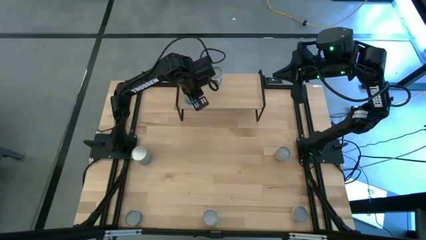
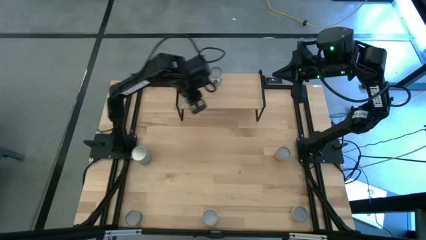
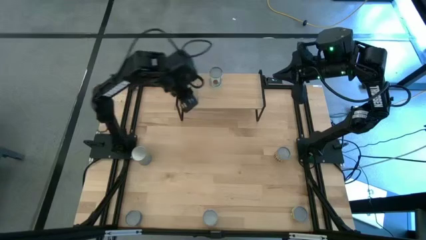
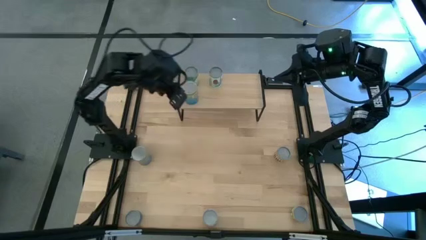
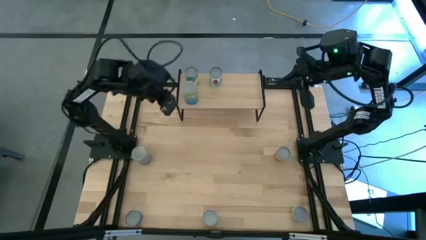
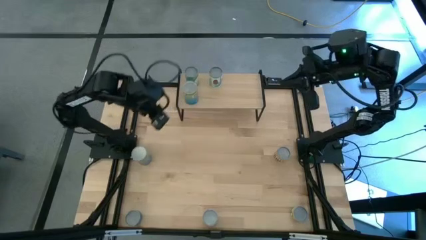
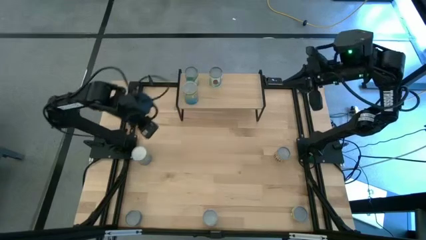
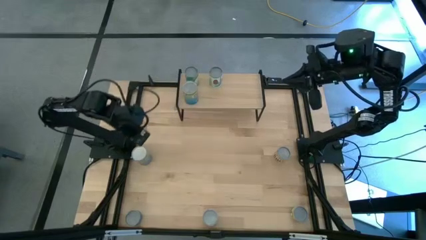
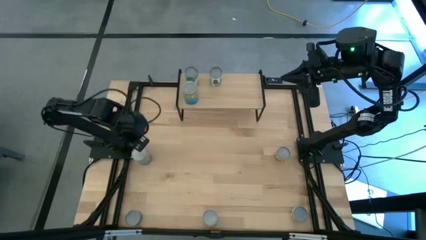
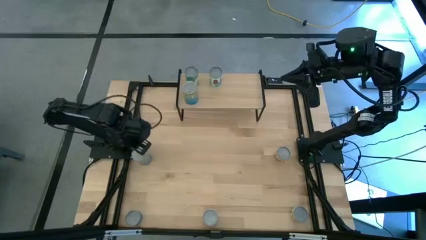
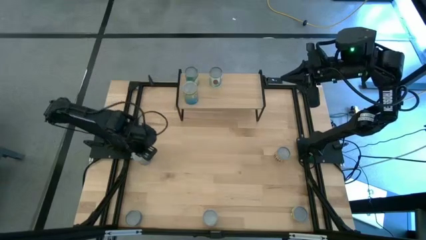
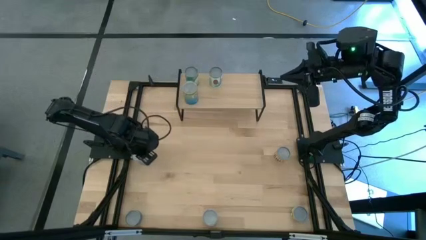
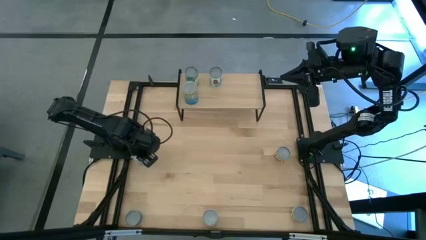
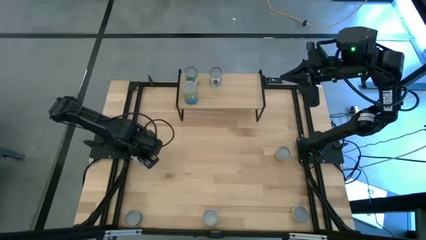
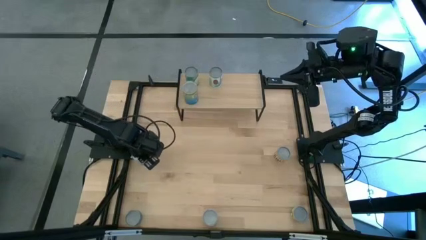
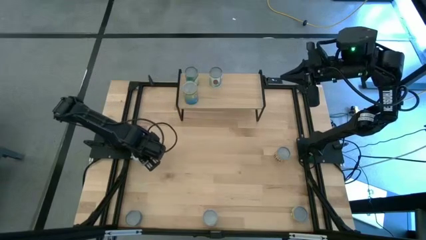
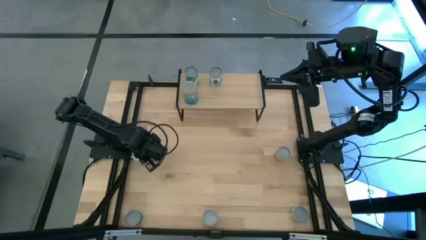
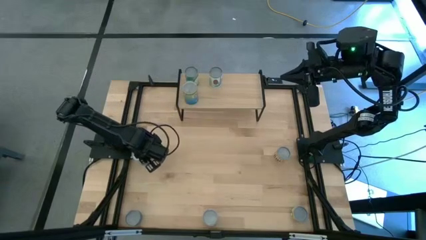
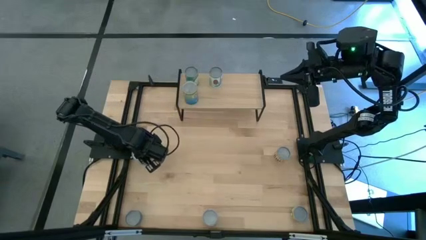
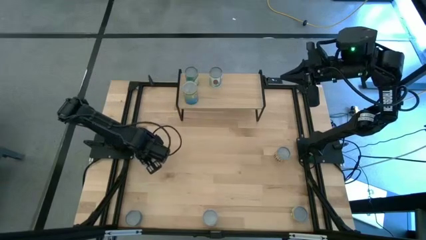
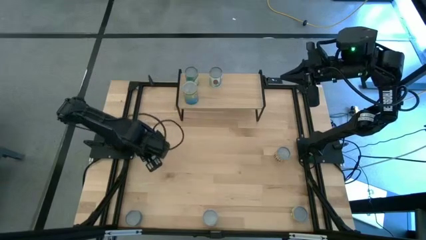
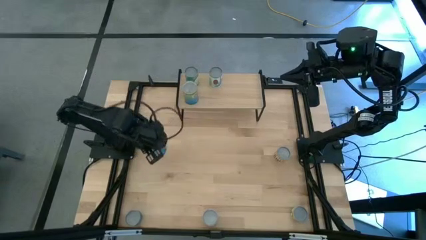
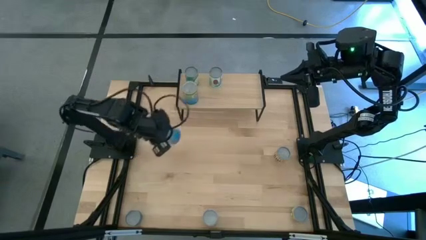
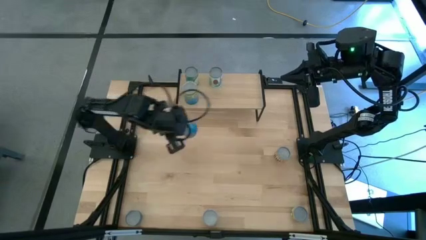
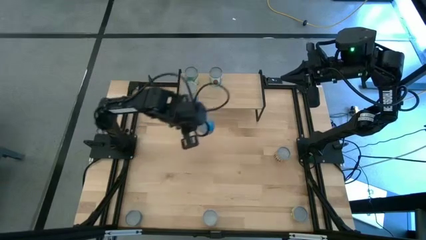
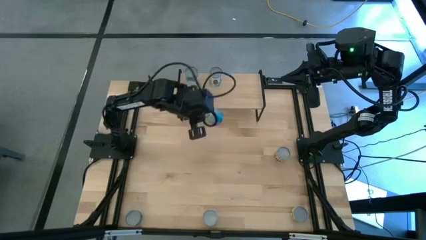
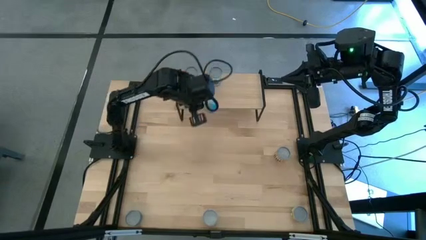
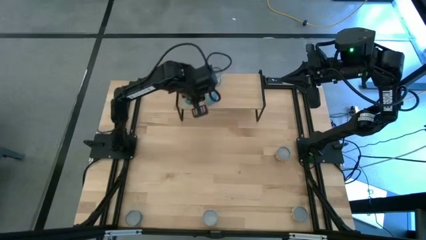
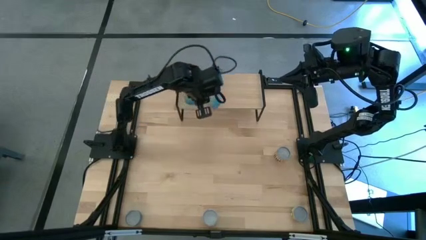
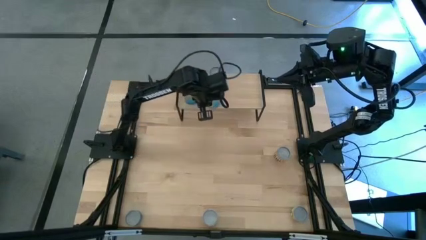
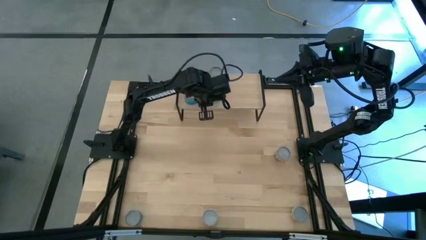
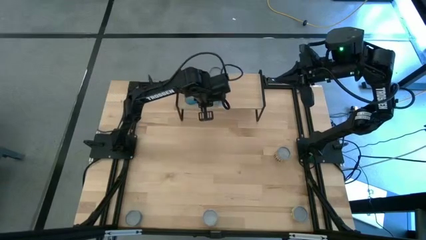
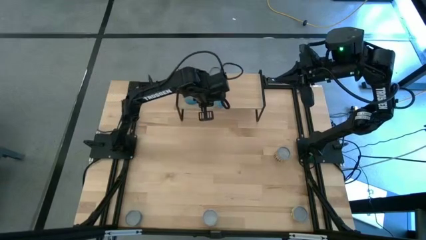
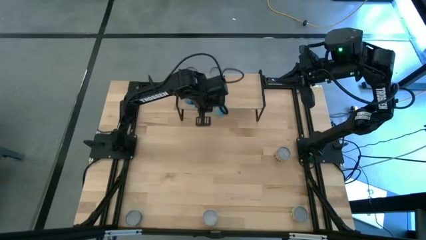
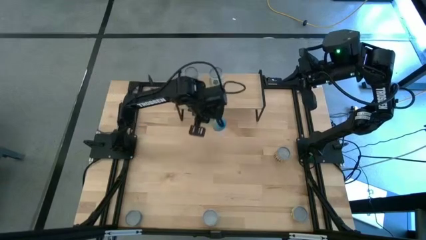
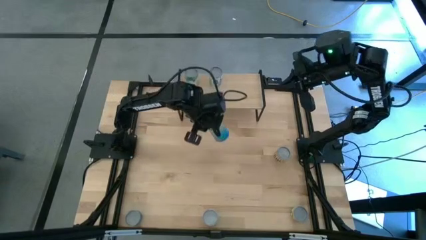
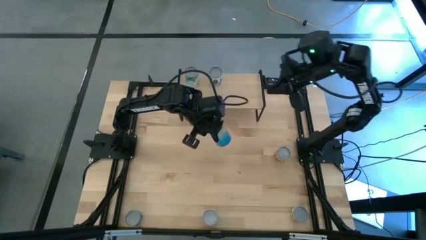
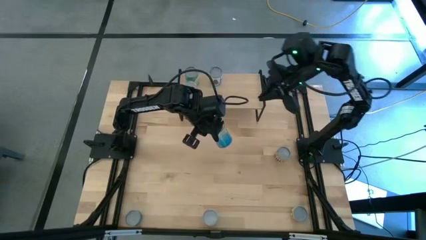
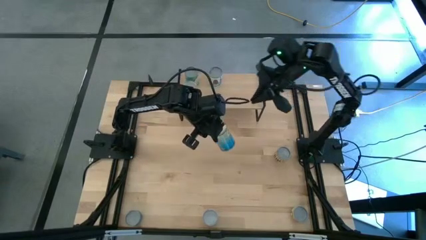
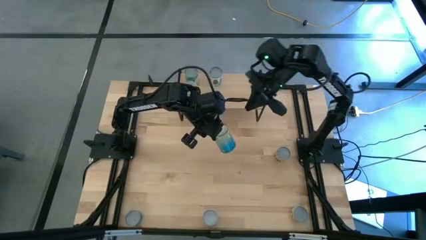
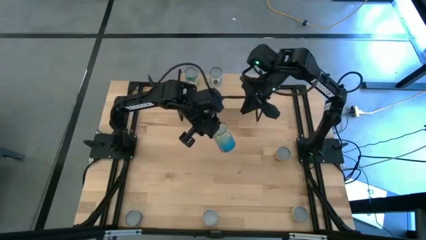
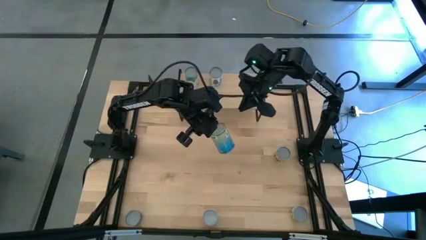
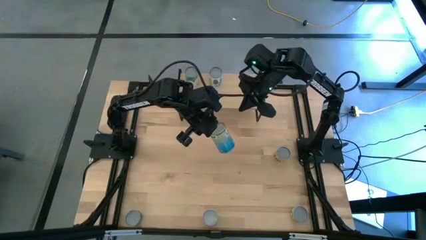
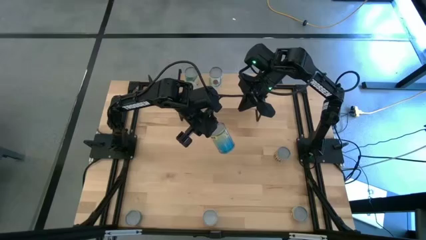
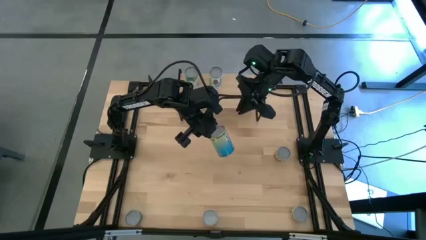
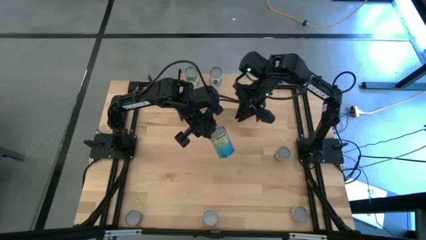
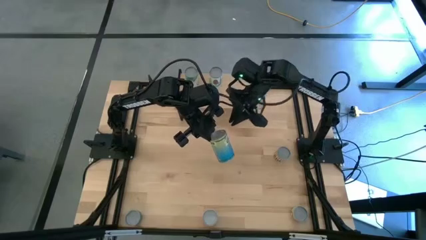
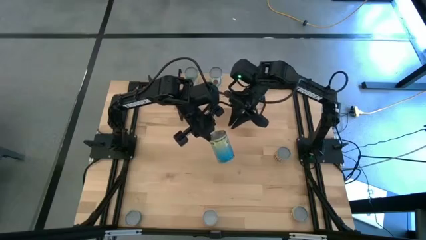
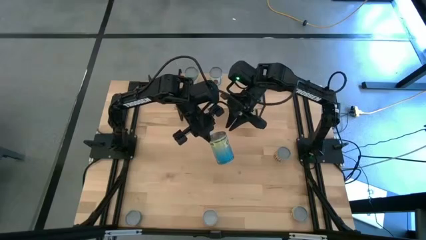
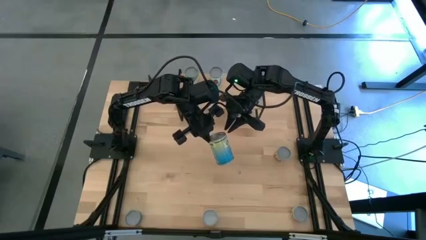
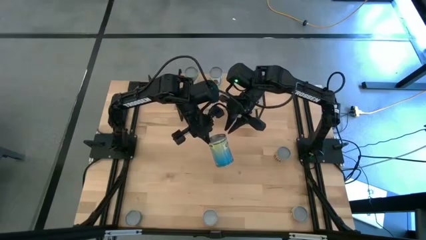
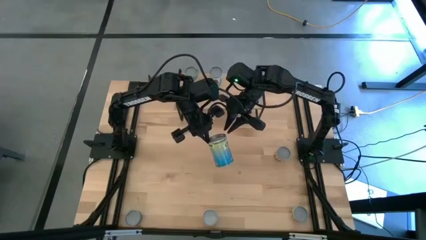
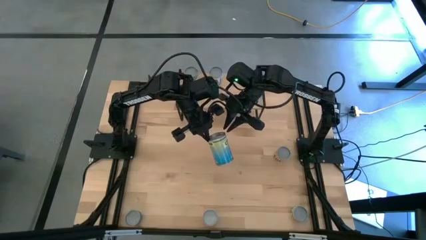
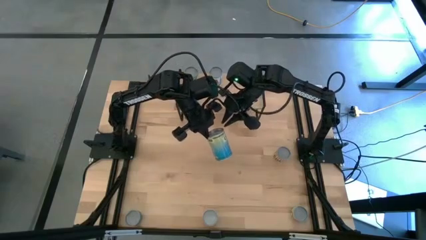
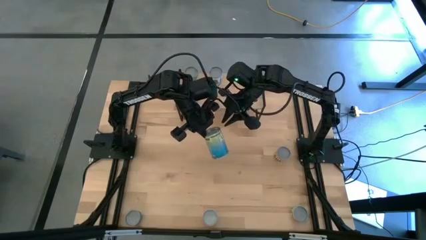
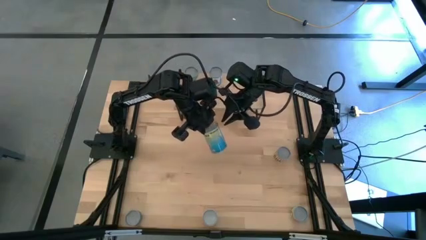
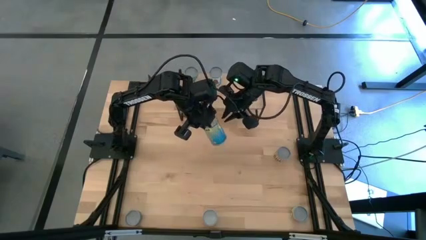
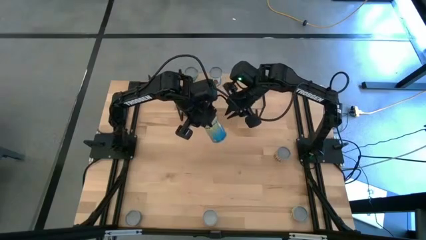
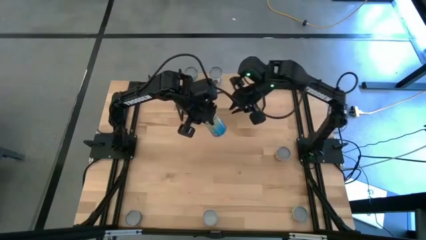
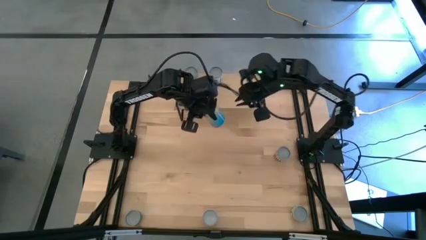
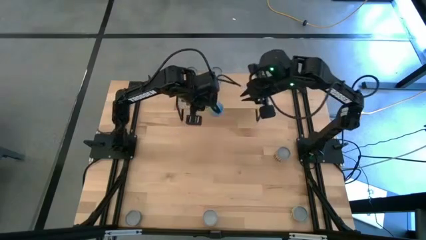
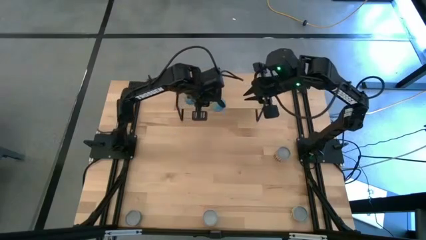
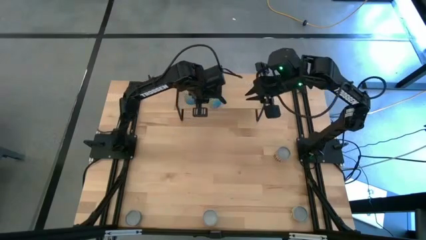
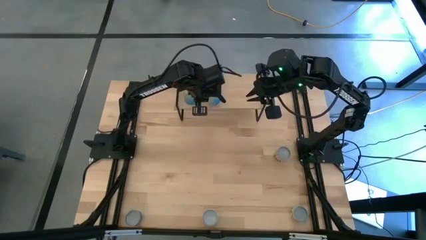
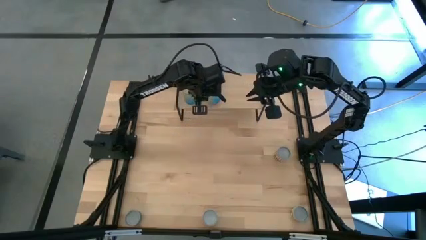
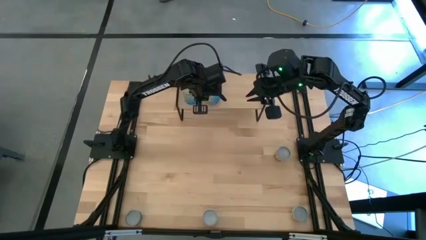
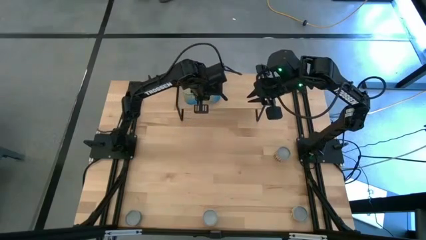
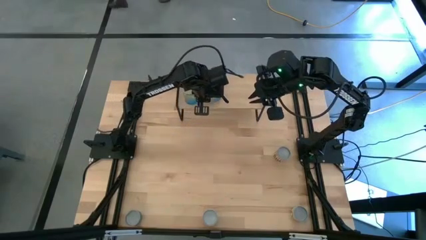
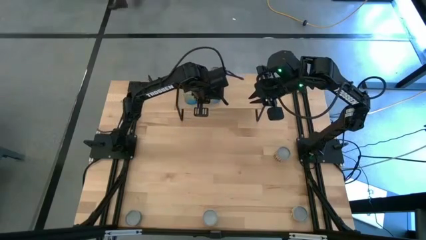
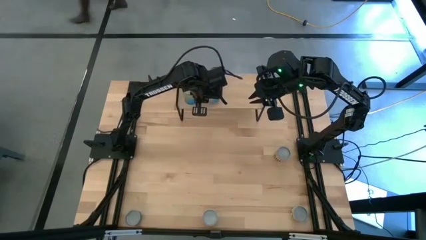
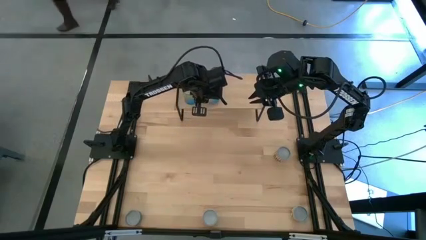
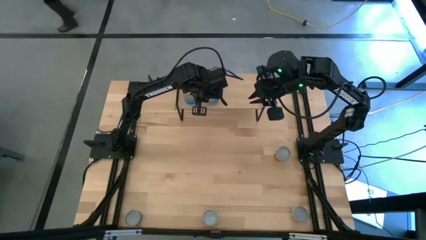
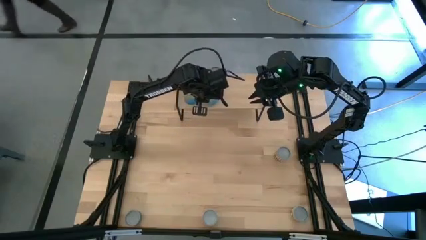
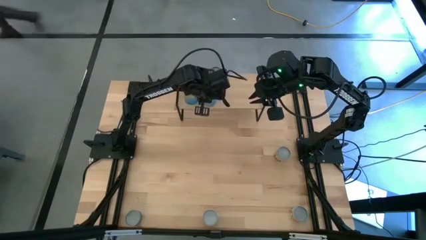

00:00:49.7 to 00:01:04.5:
Task: Pick and place cans onto a shelf
Put the canned cherries on the shelf

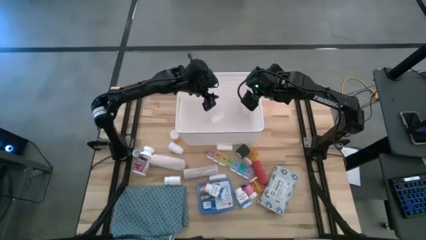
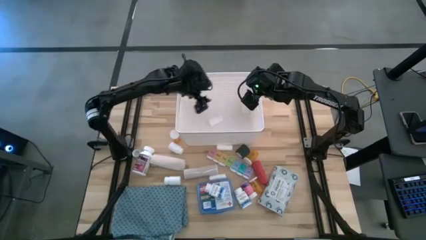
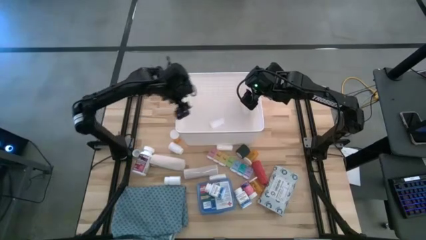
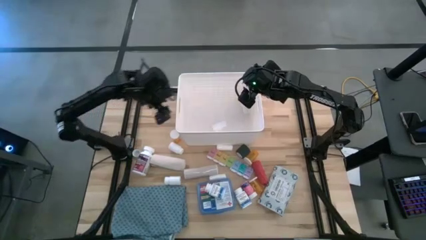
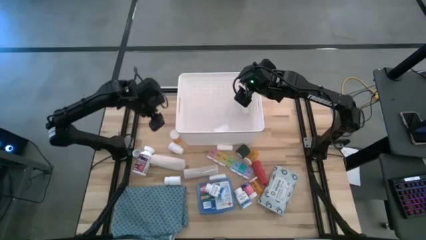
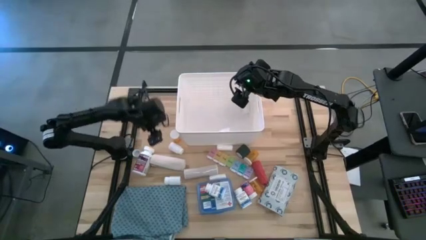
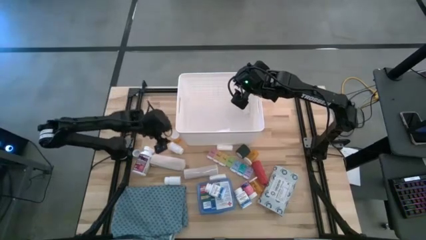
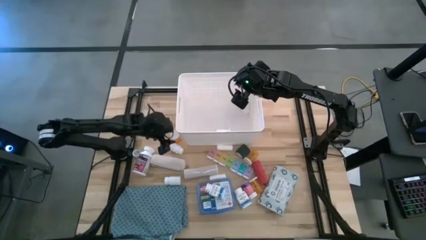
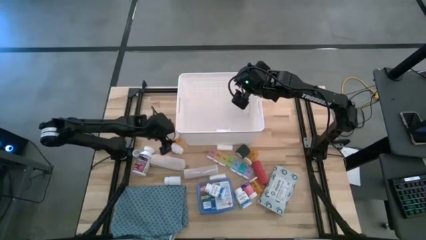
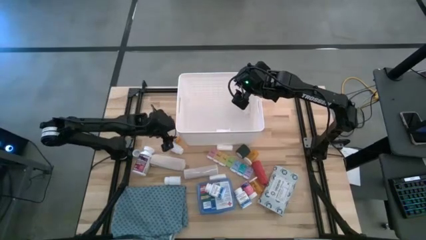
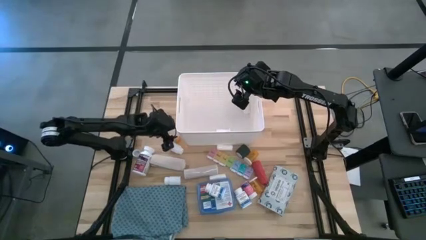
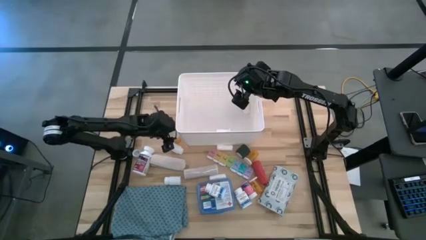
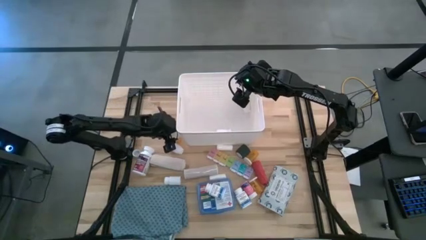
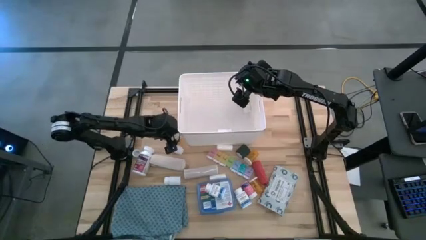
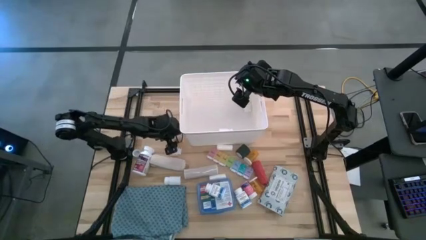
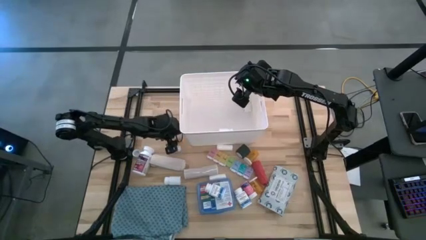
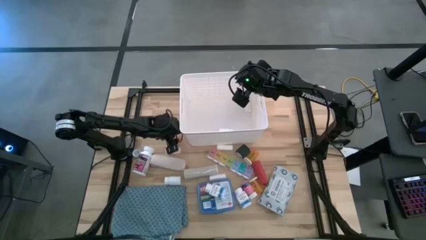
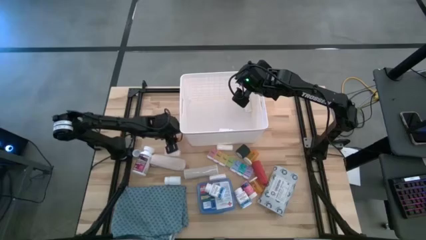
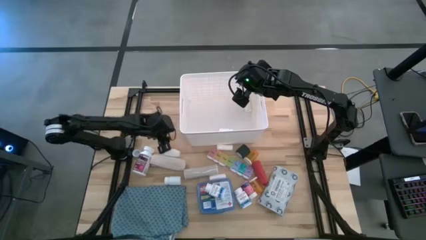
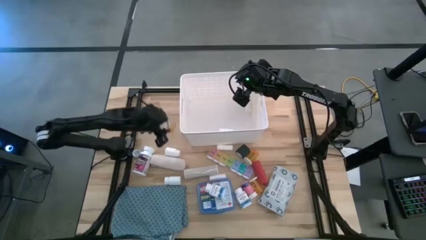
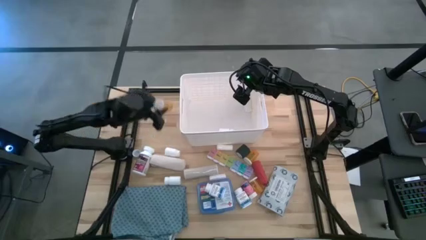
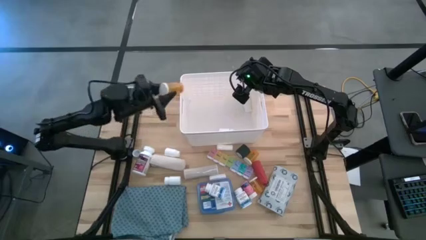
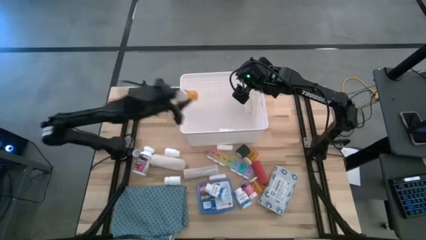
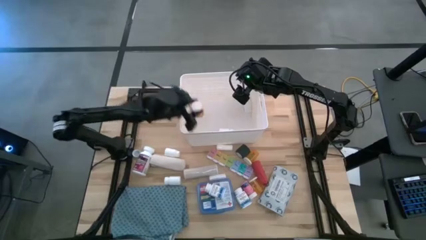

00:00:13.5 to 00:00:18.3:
Task: Pick & place medical supplies in basket/bin
Put the orange medicine bottle into the bin
